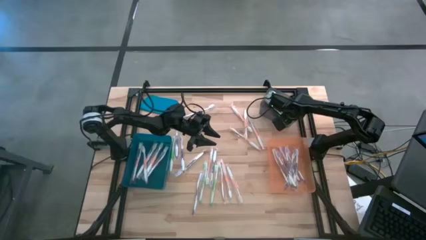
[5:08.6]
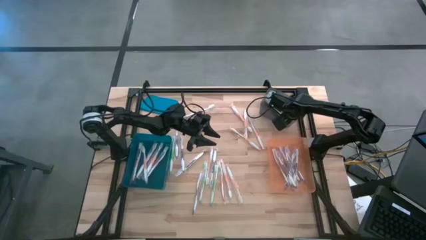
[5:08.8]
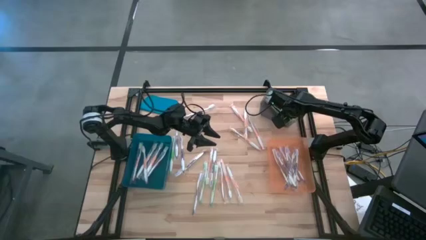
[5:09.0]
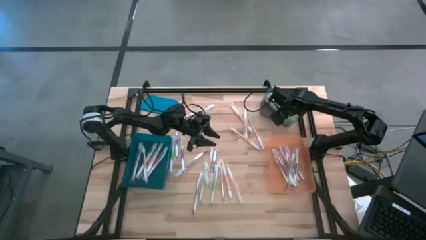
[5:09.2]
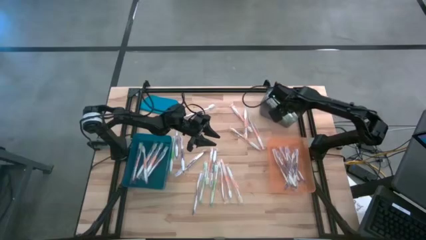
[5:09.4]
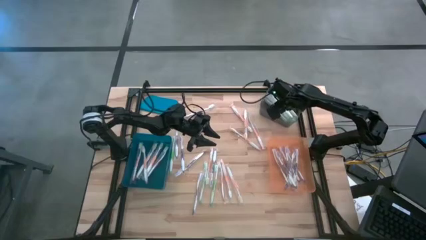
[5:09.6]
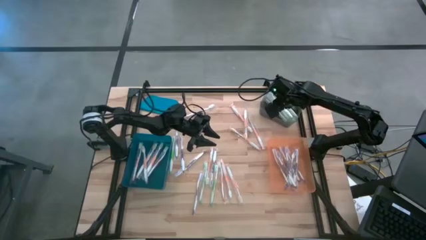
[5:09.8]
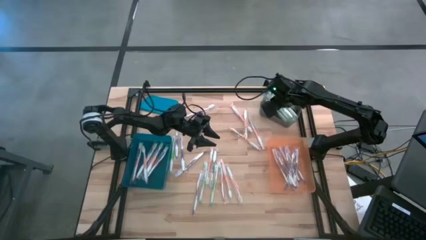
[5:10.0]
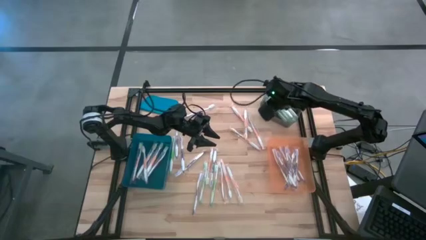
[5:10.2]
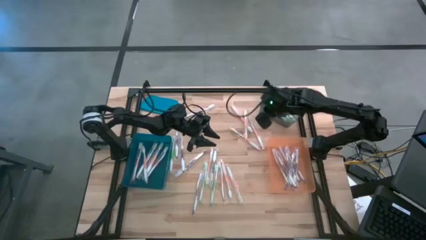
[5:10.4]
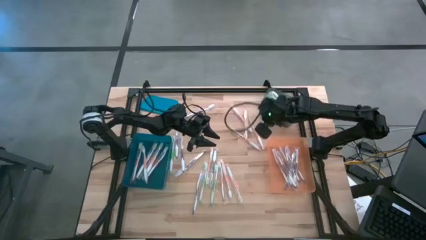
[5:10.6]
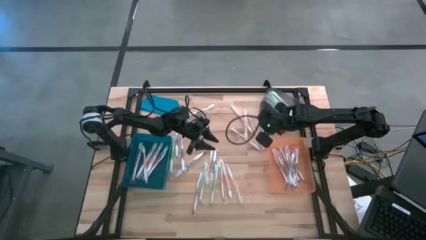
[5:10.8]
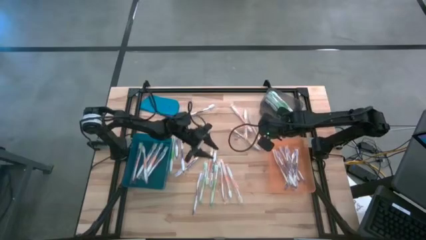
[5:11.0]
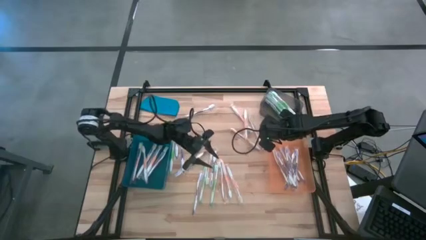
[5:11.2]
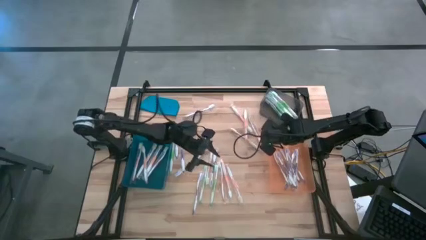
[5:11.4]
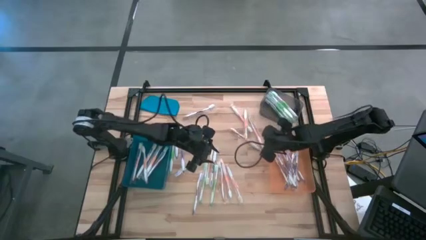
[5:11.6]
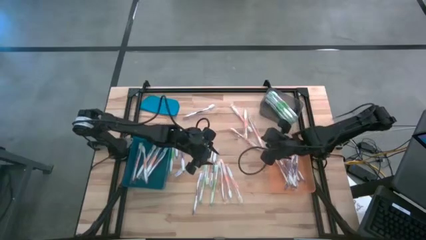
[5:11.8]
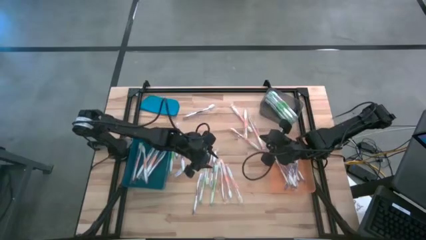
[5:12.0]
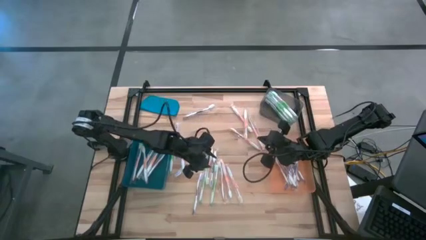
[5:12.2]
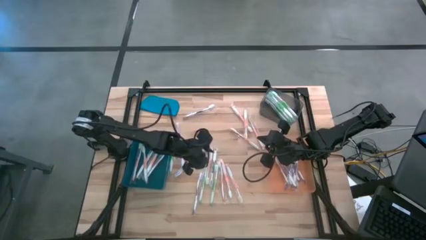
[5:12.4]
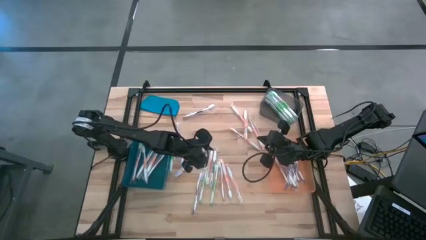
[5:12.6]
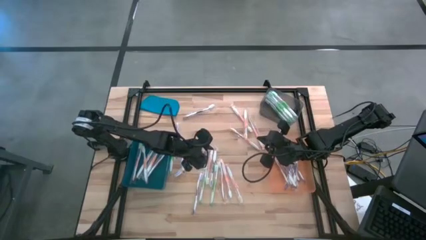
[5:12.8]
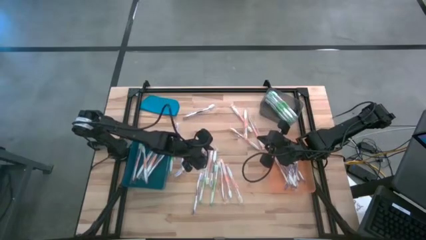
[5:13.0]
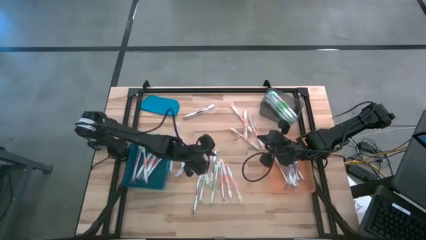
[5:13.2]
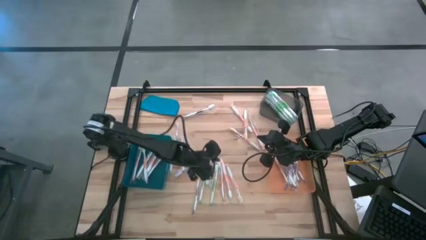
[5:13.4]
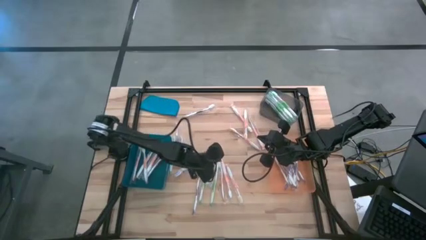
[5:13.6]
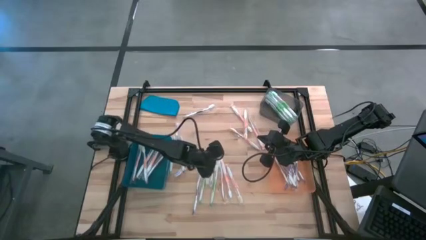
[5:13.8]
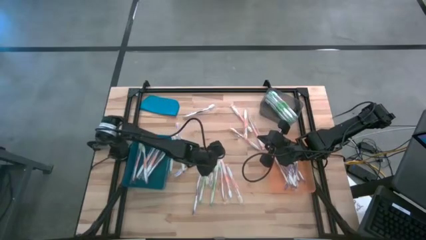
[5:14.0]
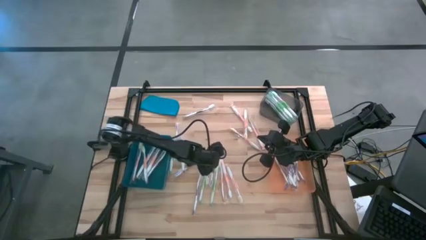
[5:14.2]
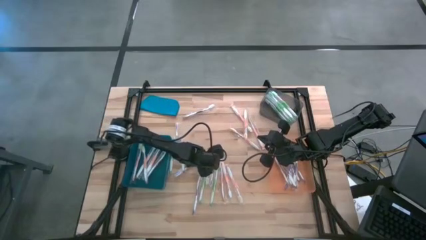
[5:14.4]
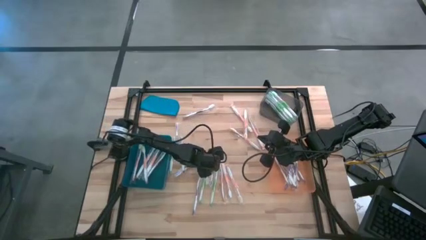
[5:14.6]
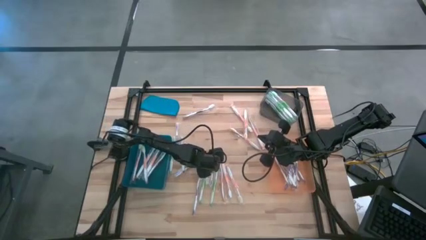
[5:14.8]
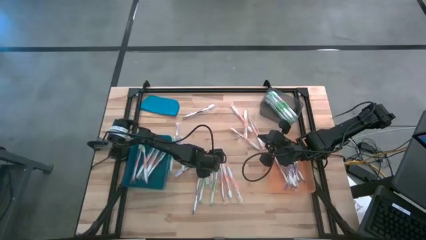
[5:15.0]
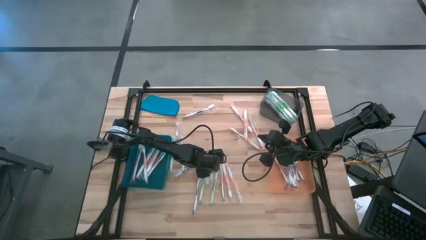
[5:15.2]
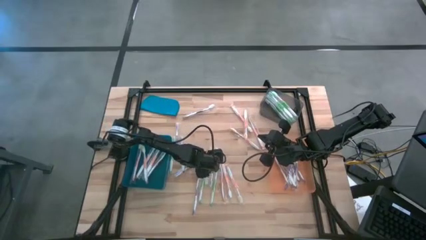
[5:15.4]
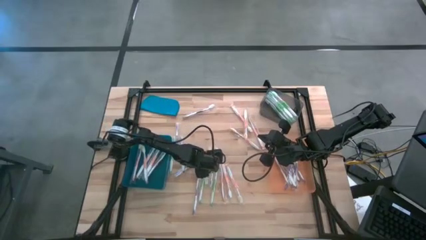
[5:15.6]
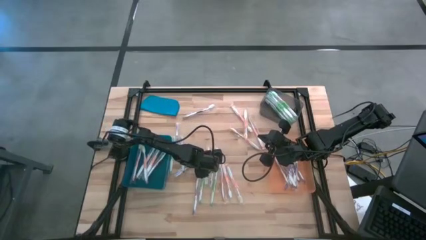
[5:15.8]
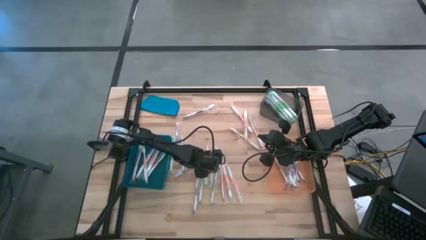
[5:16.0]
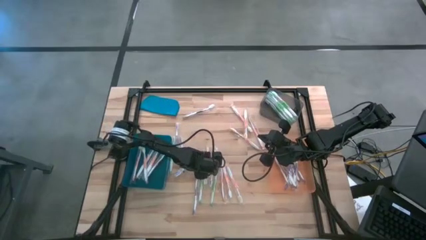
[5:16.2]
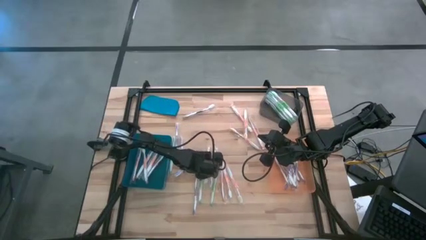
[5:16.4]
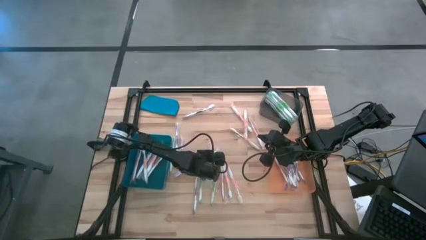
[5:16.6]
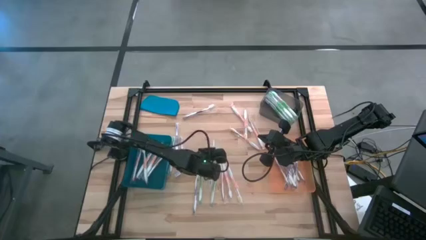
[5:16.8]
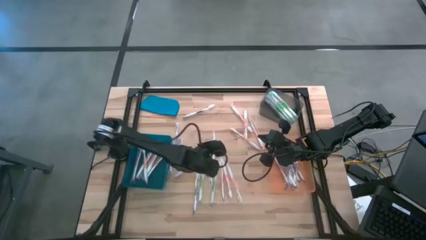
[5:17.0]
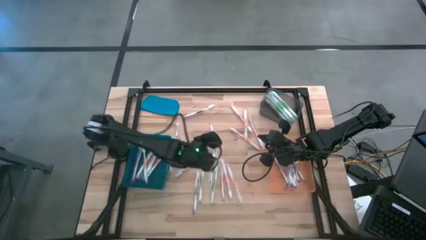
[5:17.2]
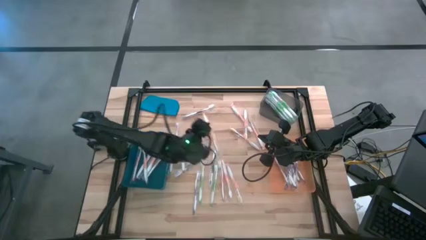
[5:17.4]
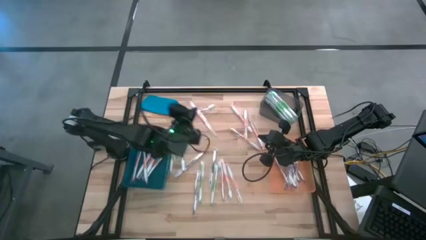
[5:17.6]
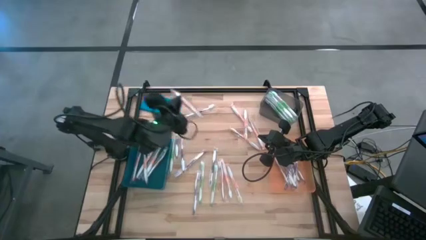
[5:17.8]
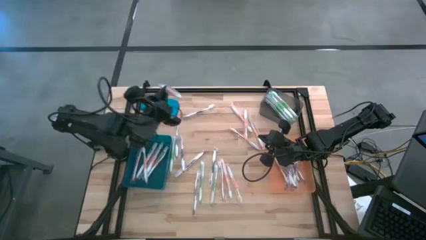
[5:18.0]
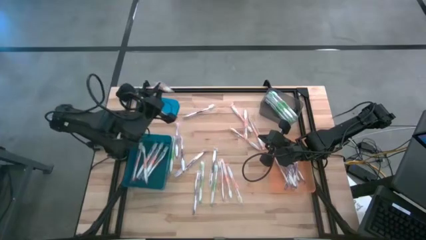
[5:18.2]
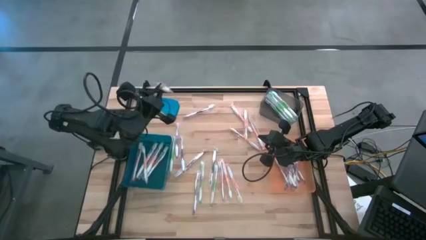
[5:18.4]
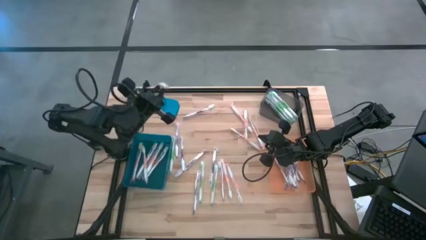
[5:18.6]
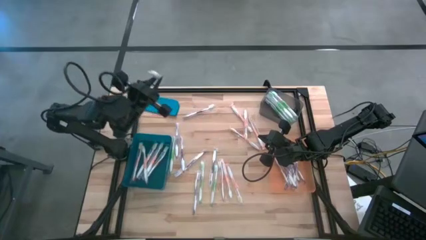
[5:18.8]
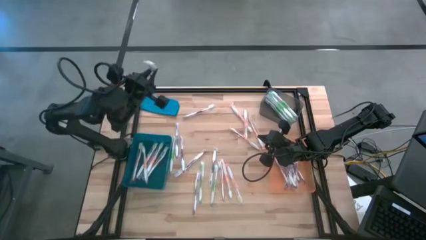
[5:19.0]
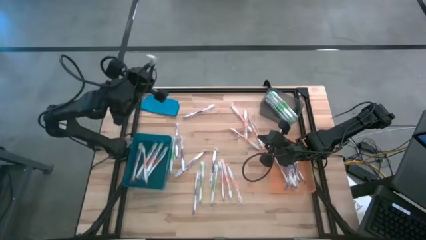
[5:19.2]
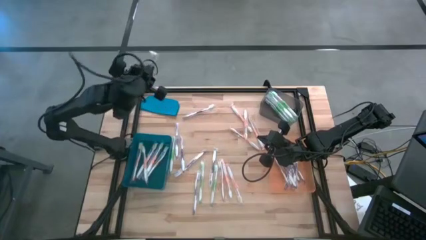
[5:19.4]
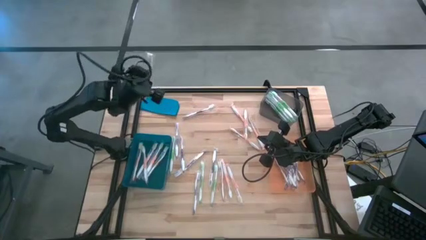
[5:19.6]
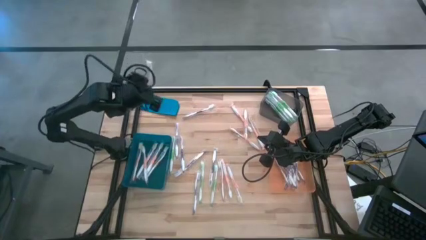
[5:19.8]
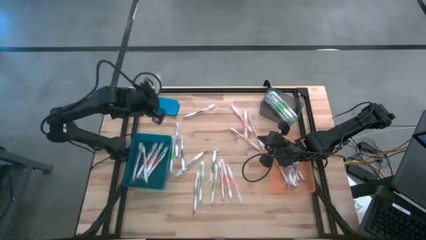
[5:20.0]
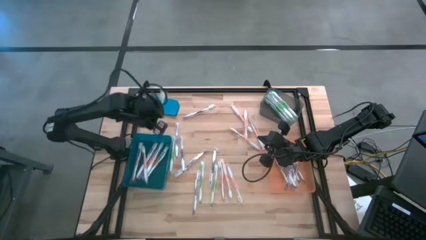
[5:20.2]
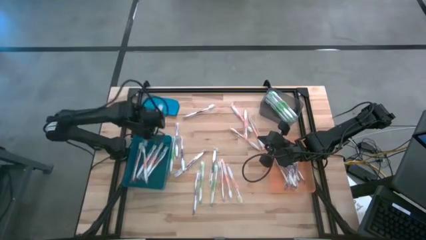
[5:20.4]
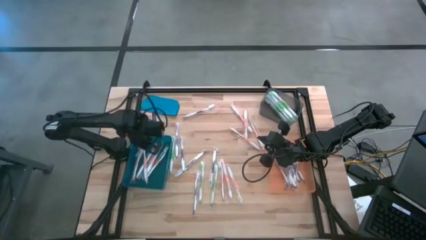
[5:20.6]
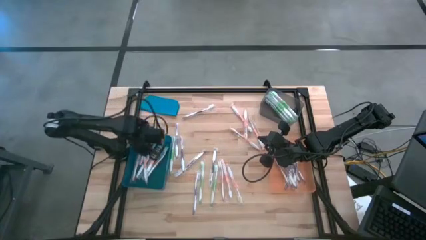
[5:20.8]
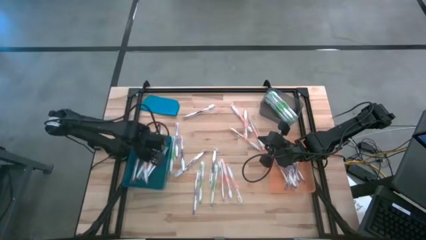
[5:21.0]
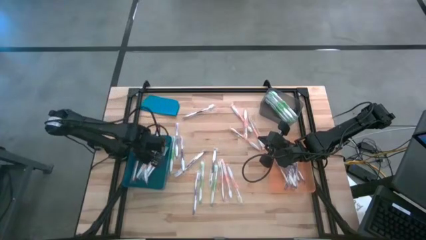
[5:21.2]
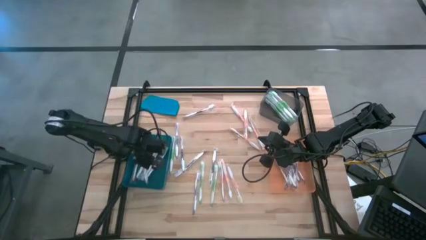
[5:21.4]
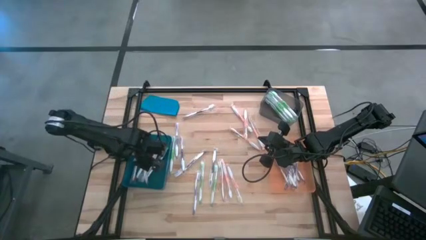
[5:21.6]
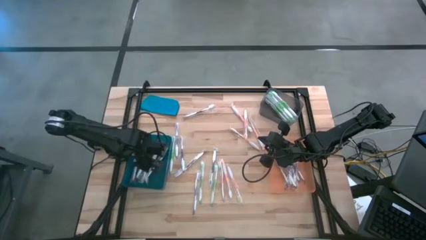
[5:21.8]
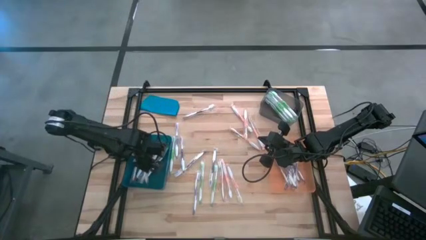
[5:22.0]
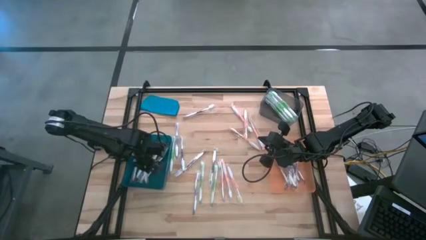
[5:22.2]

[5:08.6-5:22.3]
Task: Pick & Place Toothbrushes
Put the orange toothbrush into the blue bin
